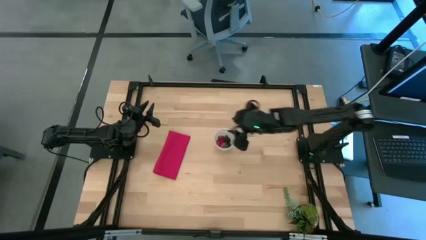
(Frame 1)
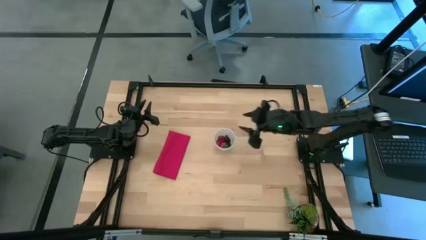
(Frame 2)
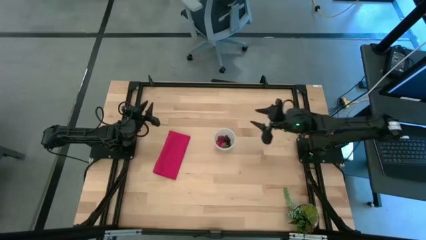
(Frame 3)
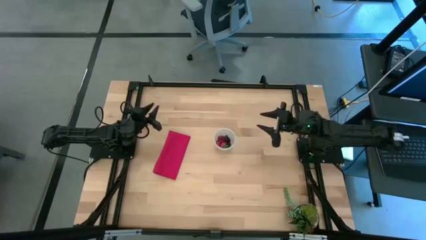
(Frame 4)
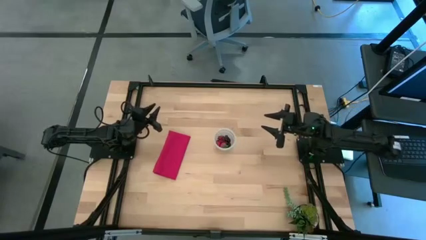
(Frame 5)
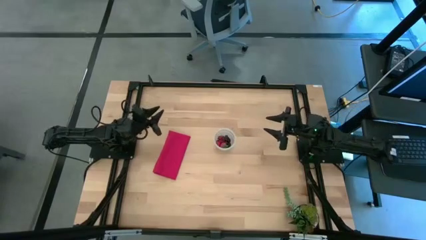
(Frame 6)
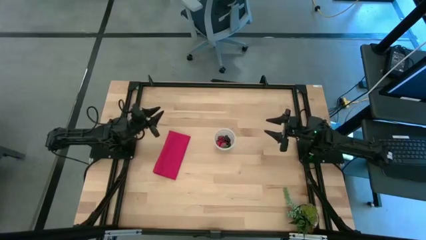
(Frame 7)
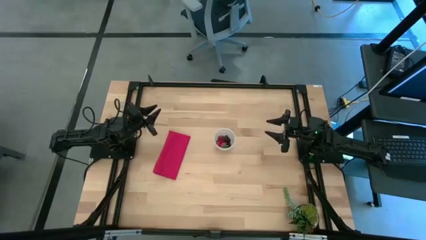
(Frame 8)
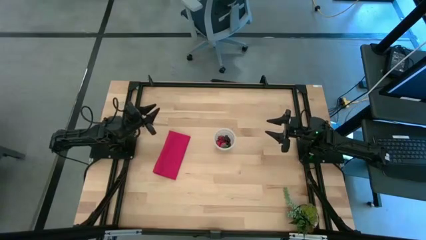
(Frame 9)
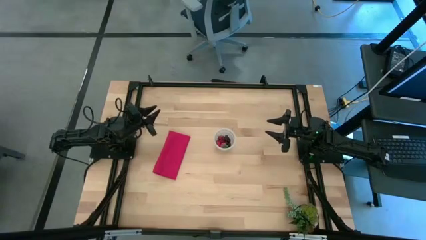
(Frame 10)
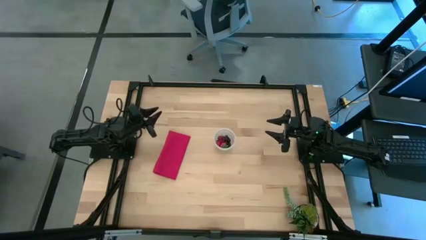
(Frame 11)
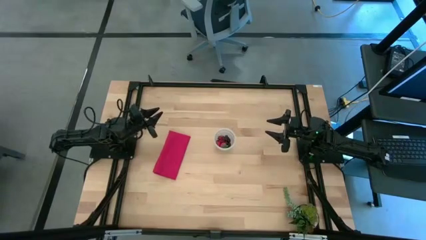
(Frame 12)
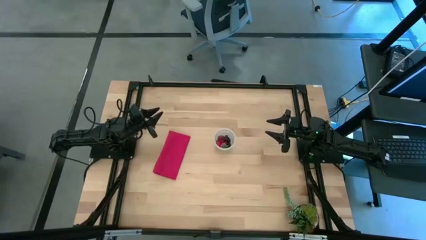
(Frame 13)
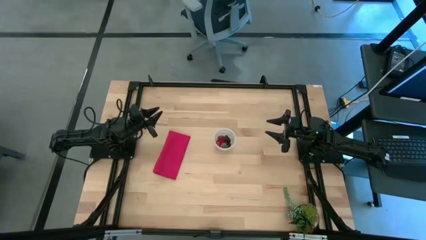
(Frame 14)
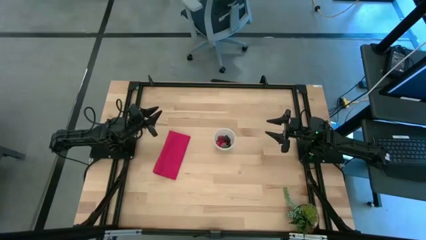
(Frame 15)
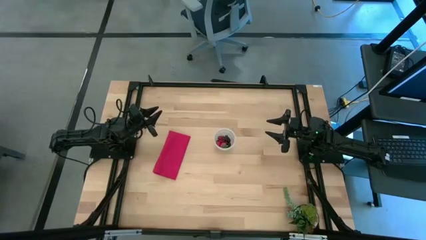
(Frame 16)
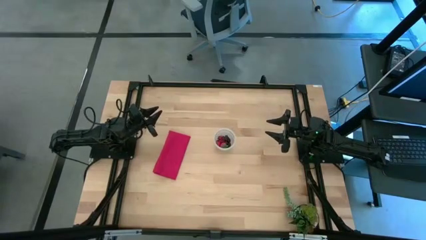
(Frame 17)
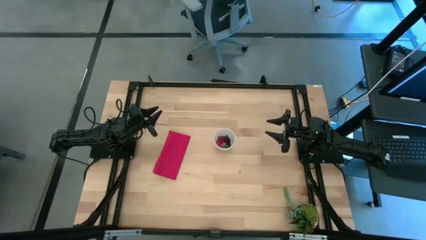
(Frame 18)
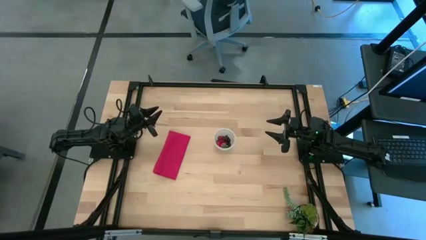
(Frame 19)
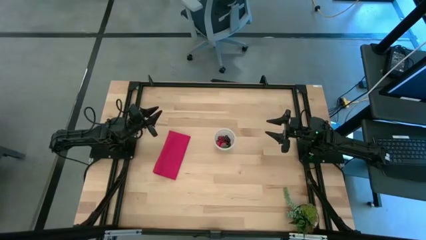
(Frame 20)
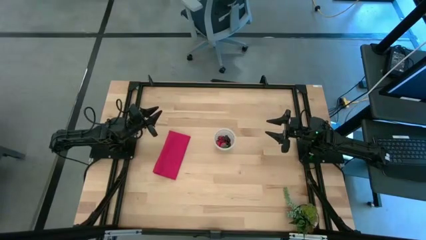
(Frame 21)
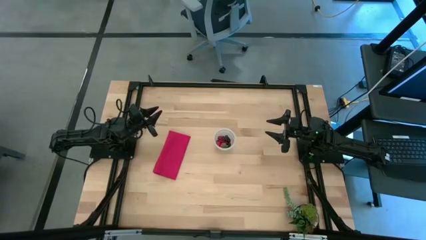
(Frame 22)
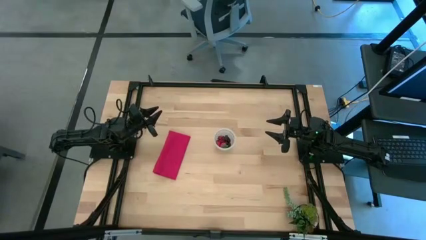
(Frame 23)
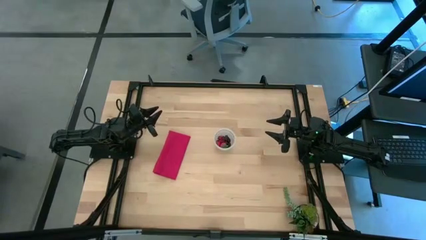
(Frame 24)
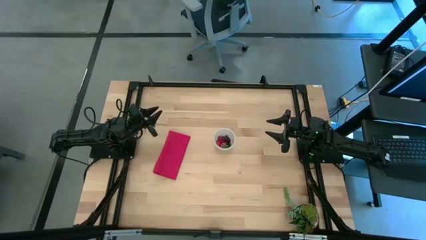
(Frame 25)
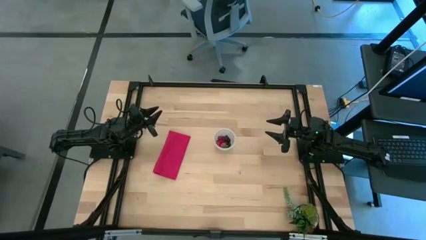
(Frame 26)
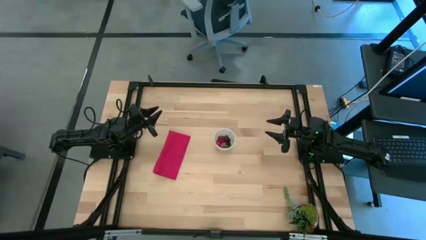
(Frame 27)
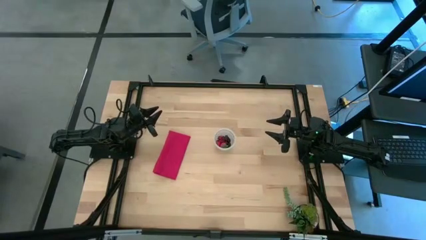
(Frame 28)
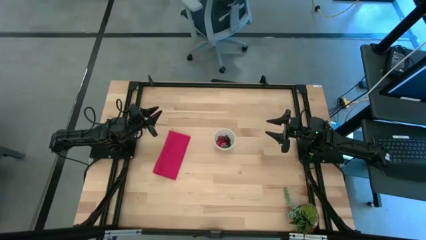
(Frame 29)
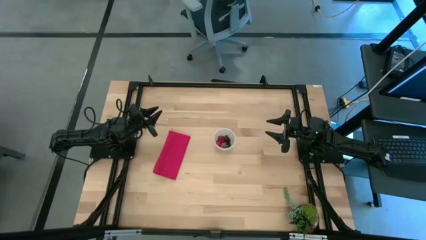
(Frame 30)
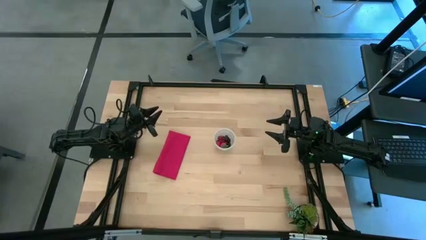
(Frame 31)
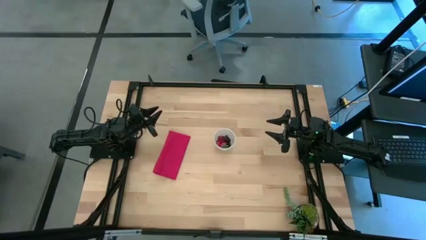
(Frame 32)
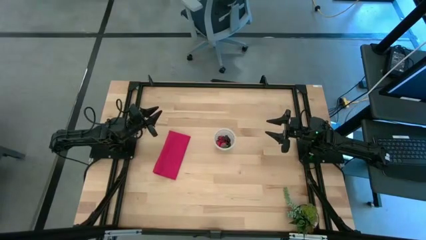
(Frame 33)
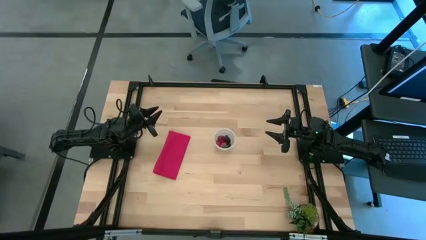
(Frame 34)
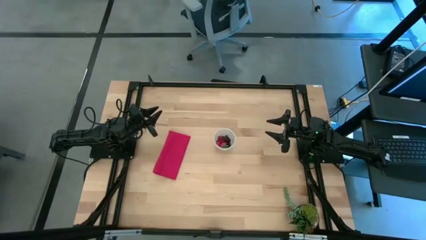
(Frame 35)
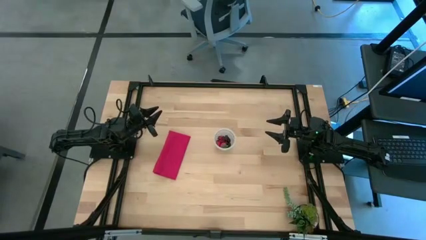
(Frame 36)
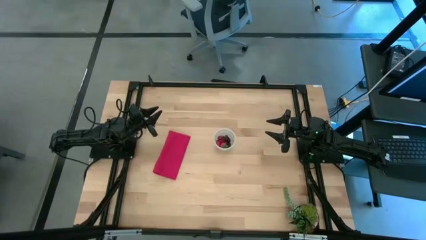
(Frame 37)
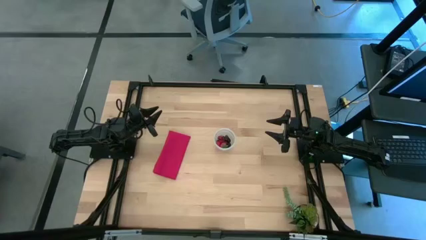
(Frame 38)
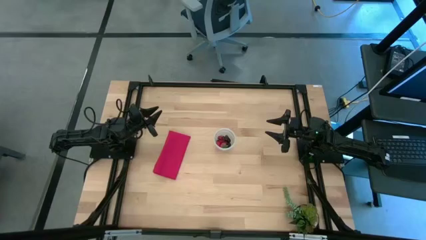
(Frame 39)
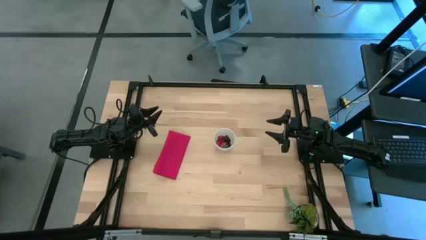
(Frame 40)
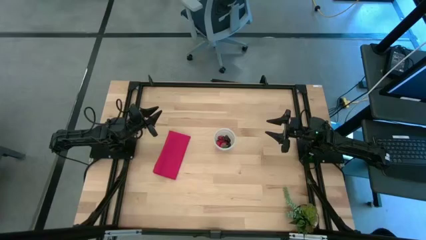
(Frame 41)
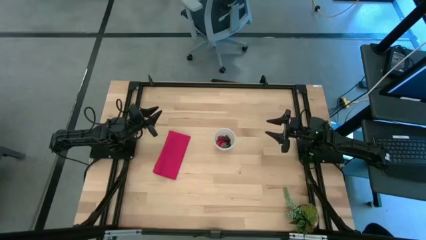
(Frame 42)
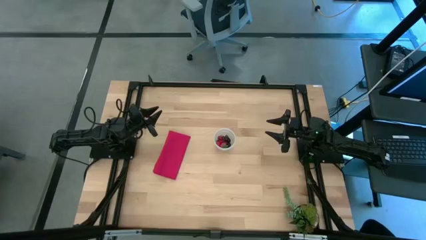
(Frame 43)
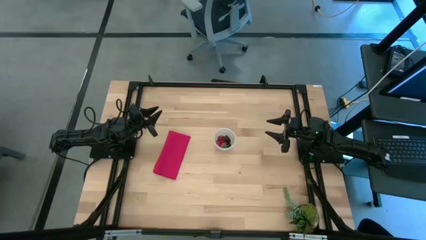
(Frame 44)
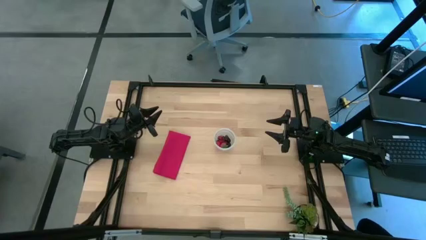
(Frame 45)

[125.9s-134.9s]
Task: Pick and placing Produce into tupperware
Return to Home Position

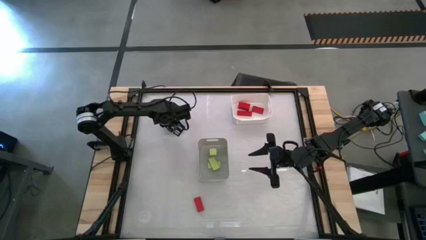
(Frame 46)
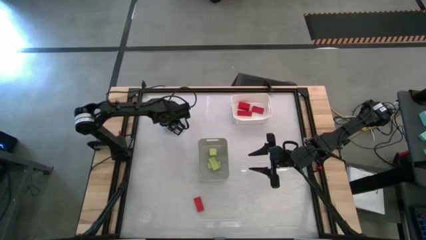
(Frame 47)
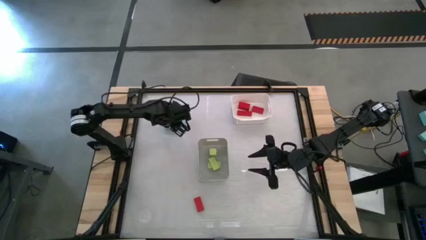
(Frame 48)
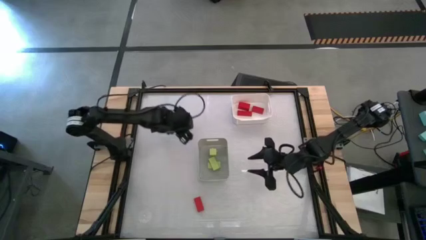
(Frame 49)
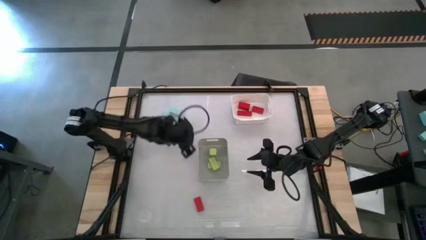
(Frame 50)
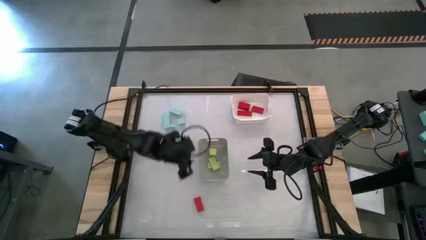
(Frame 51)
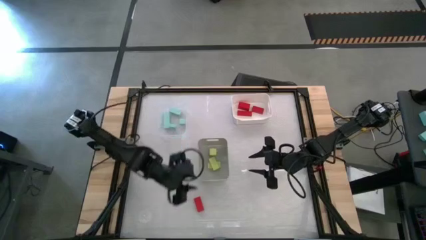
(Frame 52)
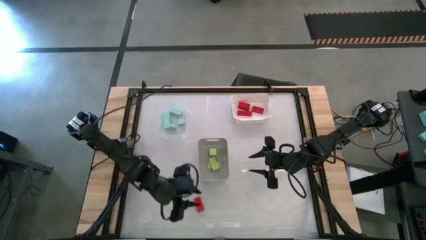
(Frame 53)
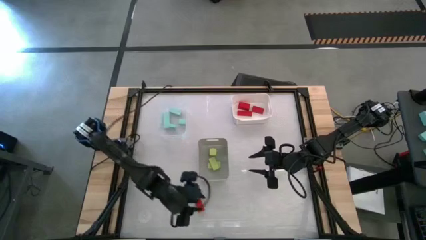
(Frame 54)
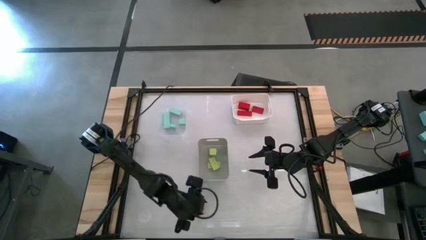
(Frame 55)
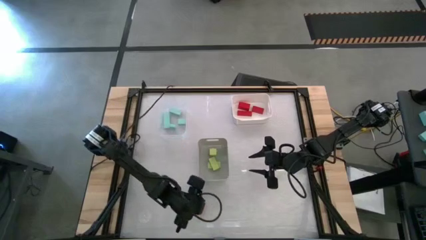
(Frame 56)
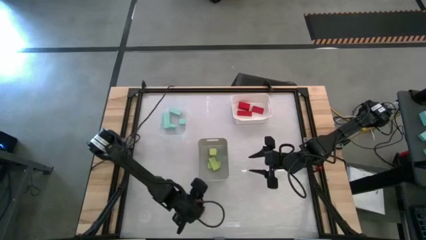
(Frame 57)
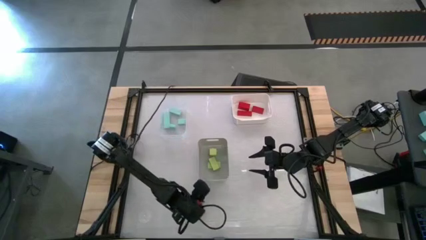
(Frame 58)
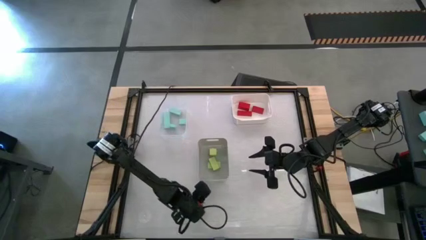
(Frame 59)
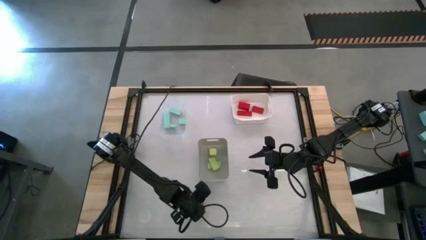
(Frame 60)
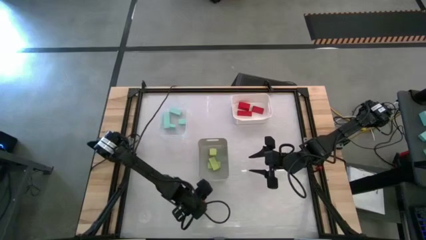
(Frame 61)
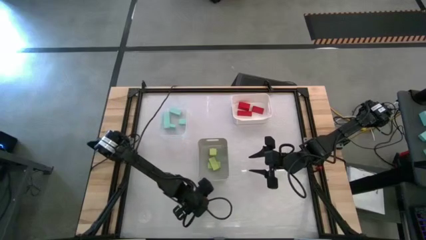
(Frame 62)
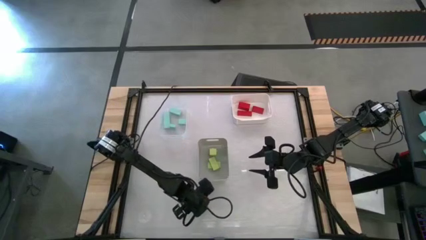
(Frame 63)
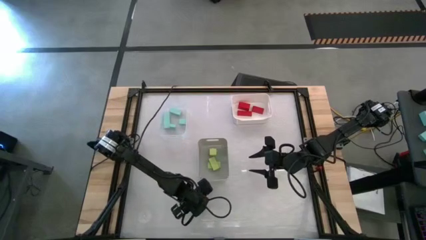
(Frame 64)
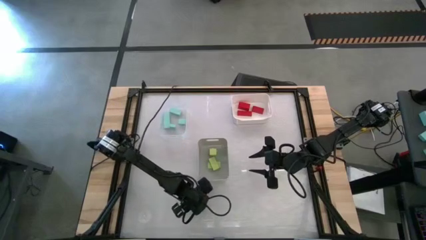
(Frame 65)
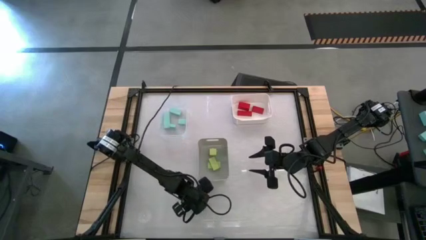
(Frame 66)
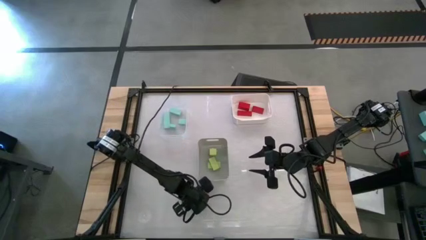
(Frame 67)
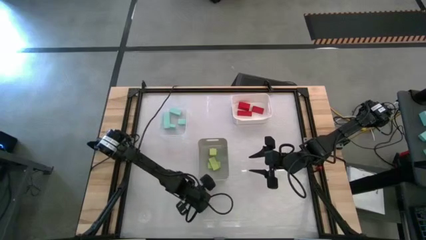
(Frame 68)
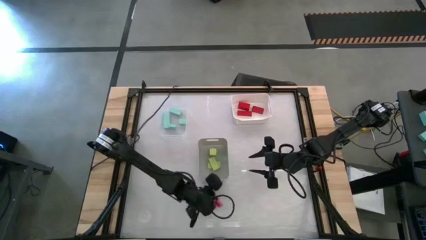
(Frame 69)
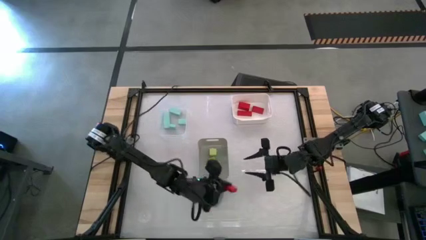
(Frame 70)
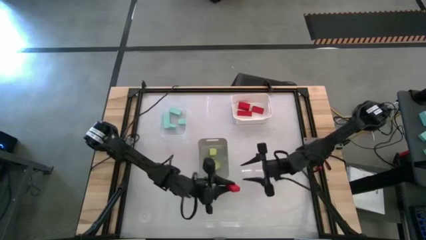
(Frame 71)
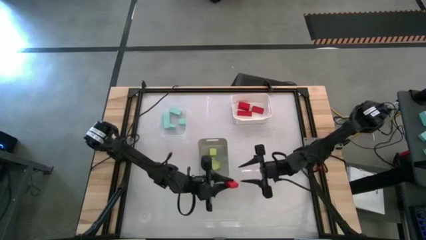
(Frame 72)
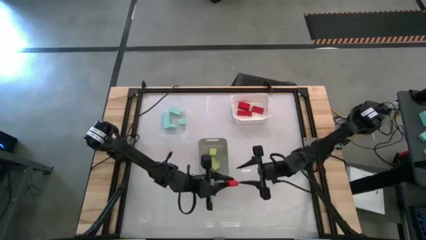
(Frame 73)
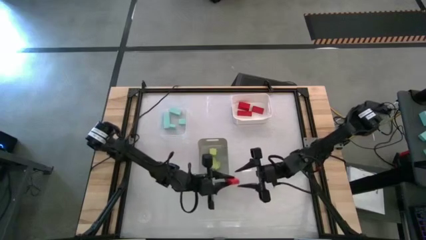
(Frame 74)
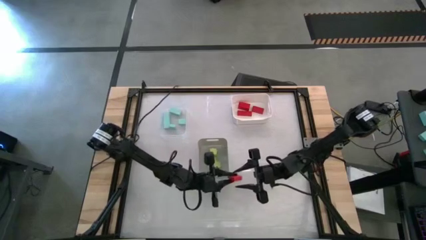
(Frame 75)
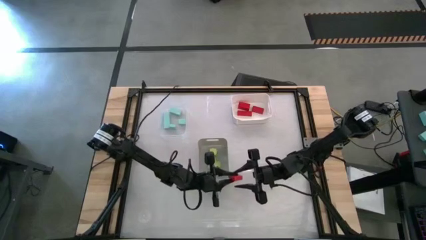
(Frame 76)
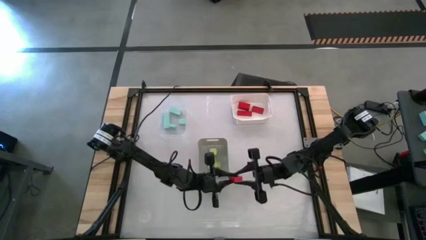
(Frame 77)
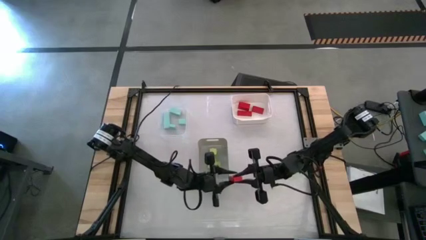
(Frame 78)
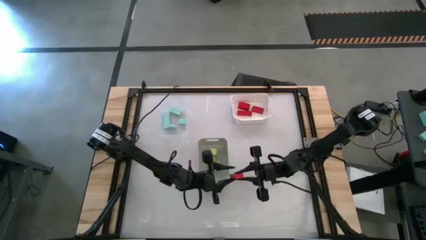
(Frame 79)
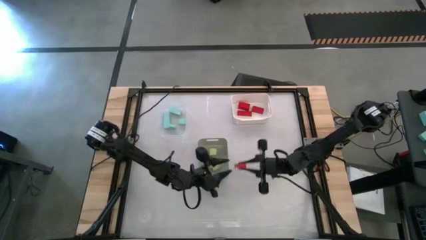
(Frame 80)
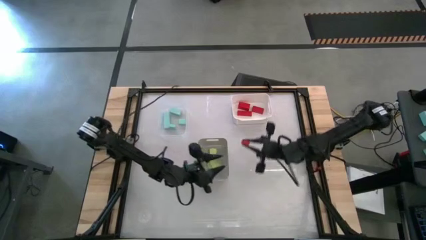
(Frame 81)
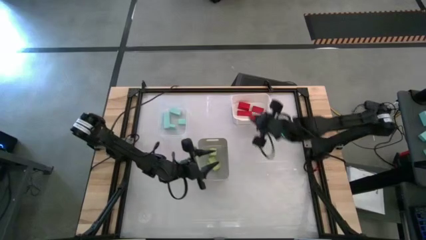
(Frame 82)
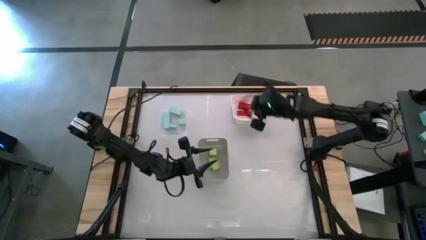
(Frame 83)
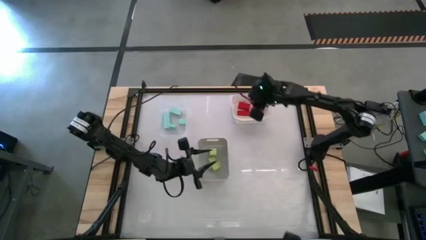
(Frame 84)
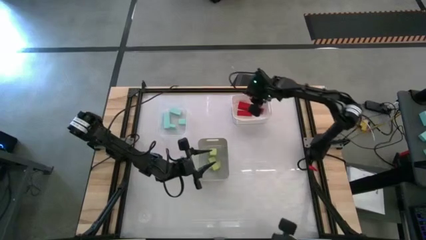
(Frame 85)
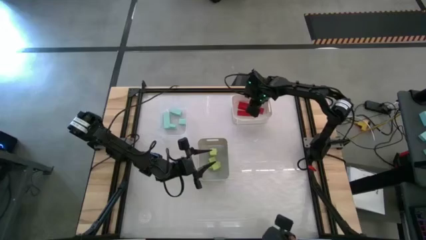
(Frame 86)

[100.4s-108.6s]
Task: Sort & place blocks by color
Put the red block into the white bin
